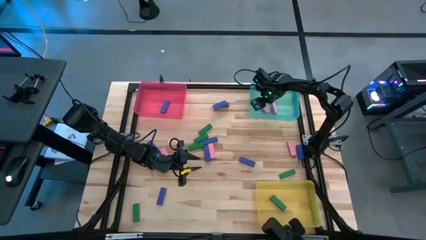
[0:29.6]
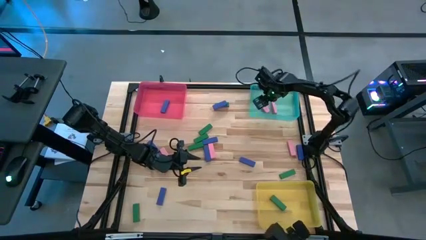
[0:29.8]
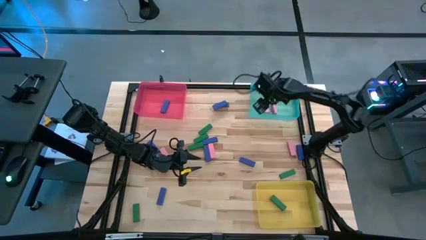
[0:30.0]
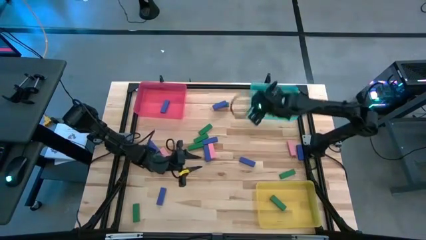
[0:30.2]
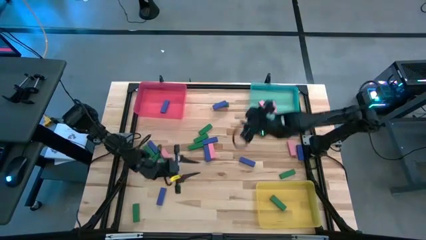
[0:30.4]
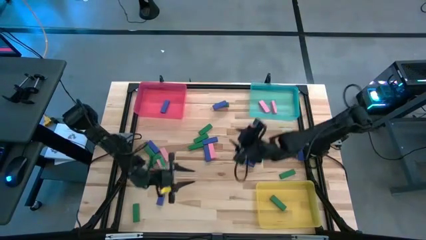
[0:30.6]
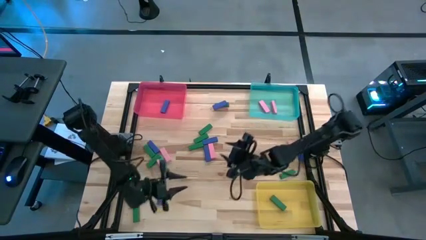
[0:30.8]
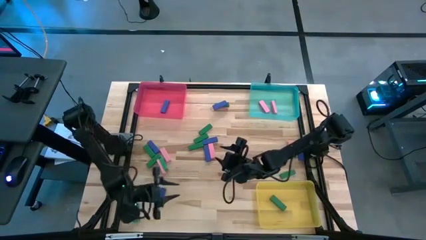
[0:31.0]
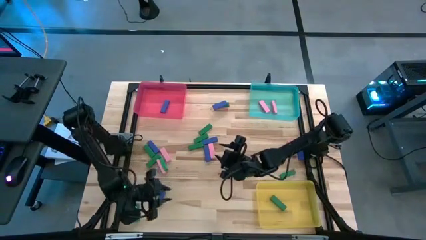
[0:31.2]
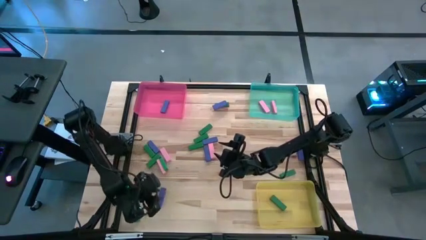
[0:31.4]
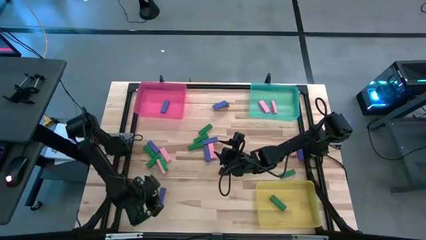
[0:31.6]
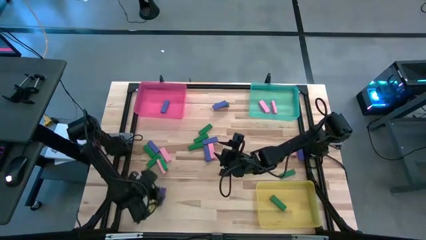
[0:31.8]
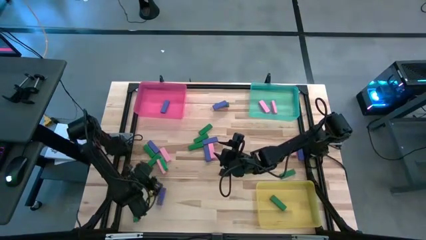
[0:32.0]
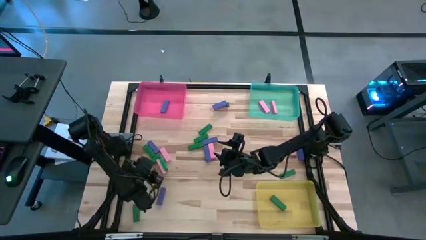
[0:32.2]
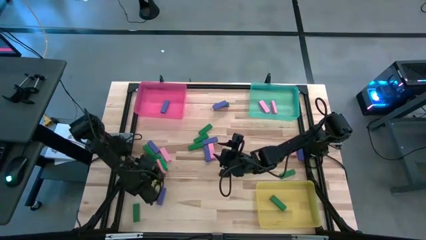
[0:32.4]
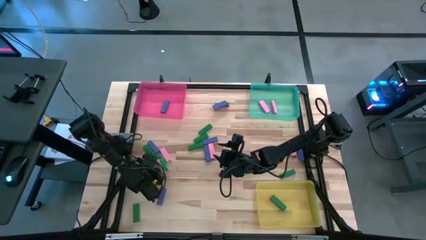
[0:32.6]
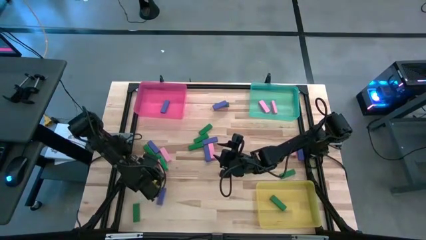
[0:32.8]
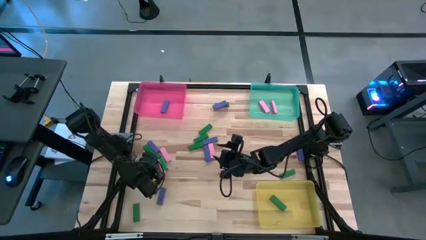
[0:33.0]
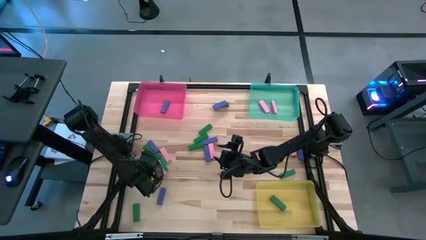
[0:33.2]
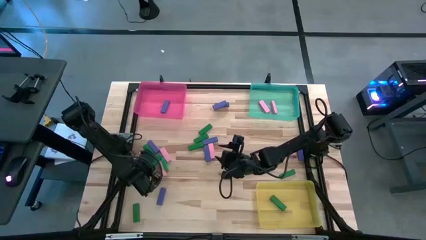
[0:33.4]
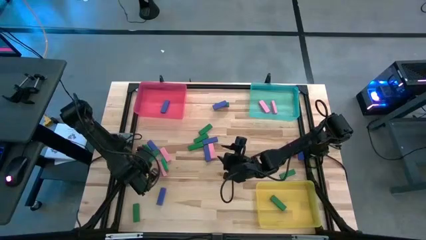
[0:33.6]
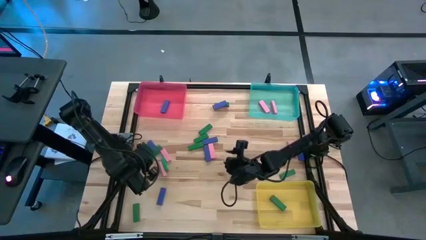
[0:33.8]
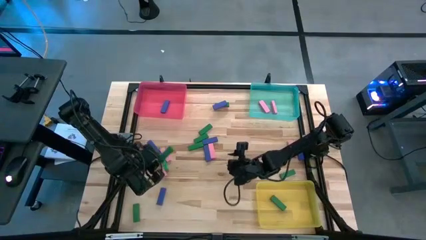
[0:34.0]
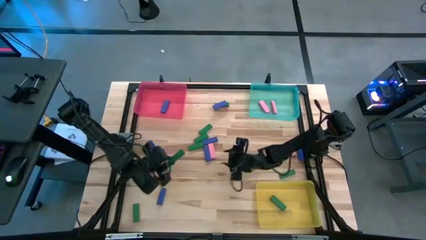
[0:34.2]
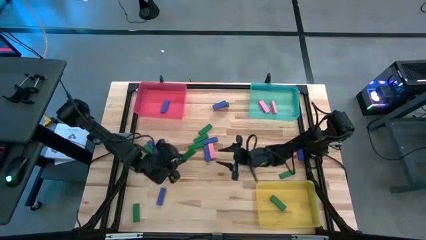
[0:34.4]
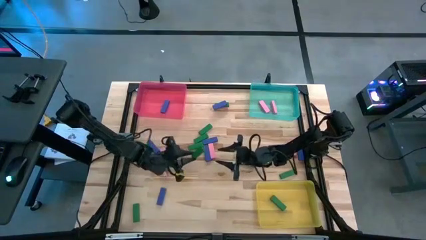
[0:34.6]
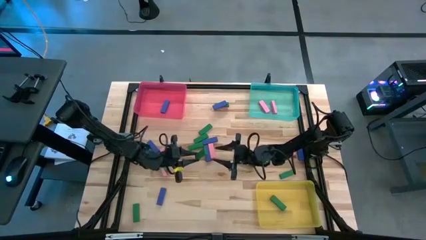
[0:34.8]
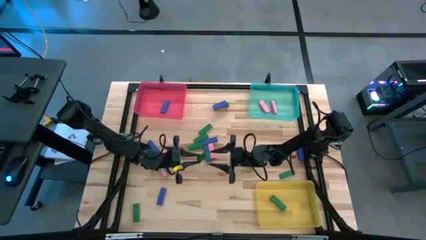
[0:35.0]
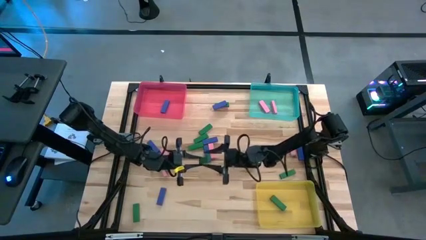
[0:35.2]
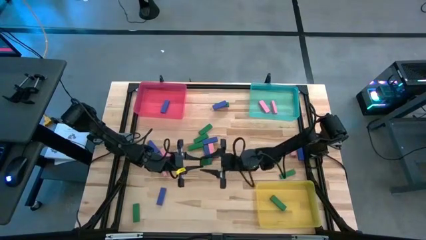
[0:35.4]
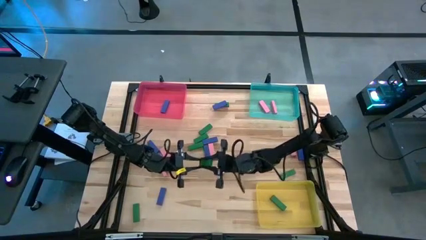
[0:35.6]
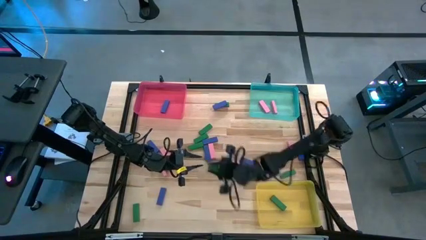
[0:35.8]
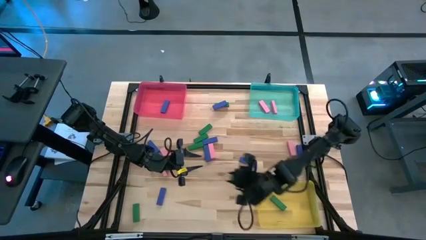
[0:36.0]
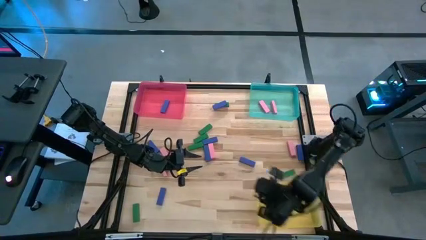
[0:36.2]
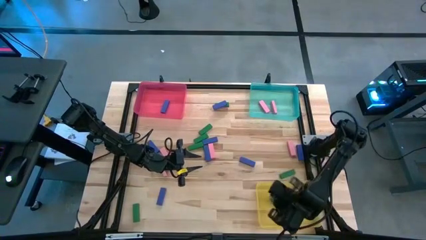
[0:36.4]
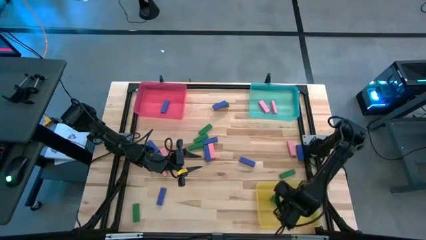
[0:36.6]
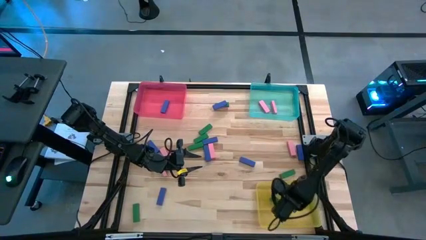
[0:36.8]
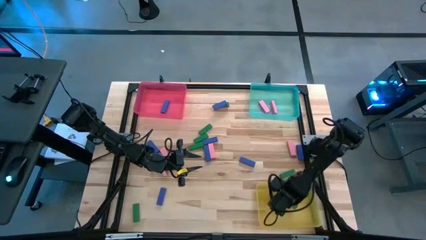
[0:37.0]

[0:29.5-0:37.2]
Task: Sort blocks
Put the green block into the yellow bin

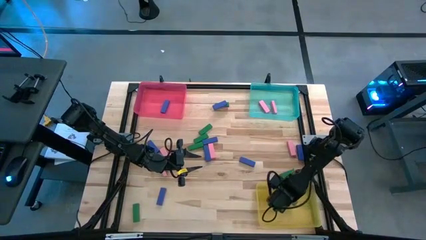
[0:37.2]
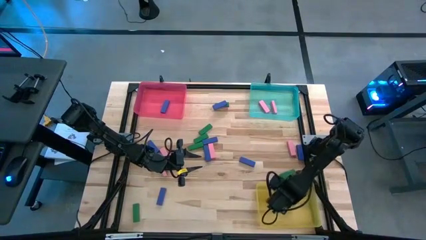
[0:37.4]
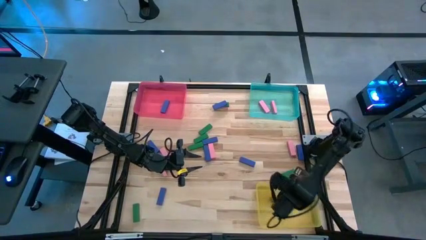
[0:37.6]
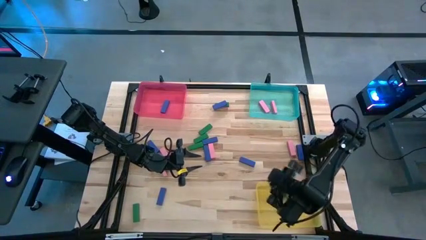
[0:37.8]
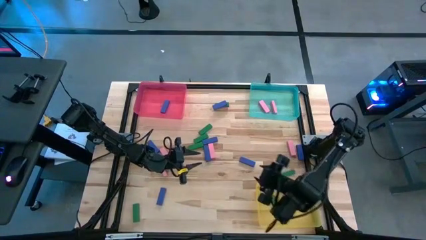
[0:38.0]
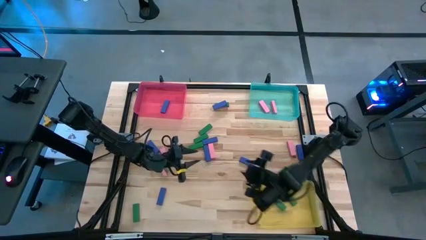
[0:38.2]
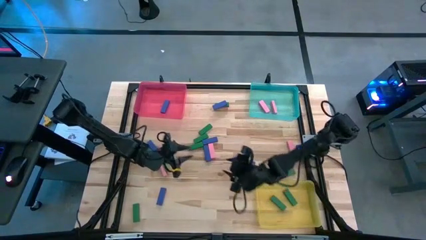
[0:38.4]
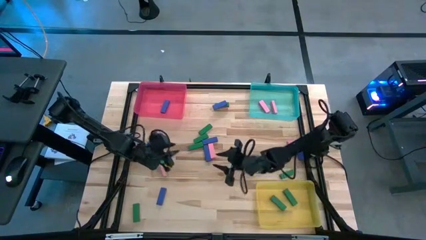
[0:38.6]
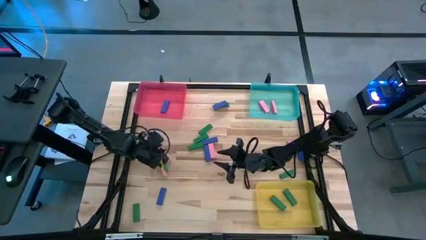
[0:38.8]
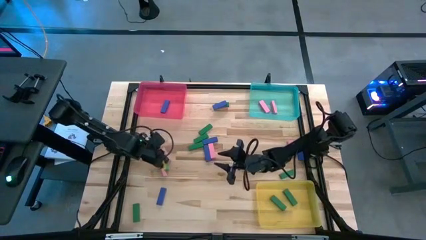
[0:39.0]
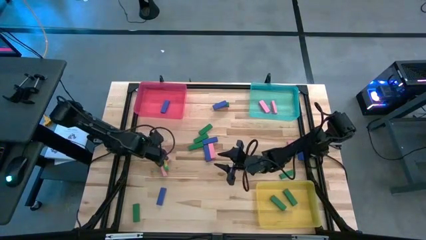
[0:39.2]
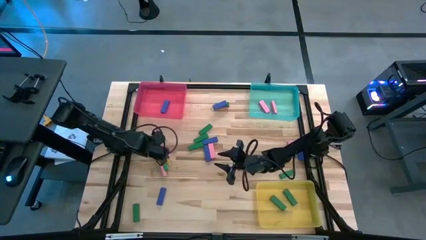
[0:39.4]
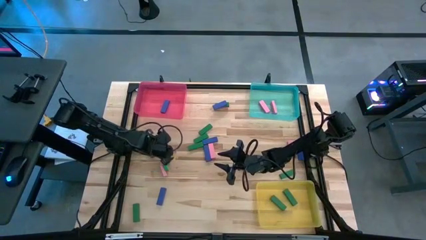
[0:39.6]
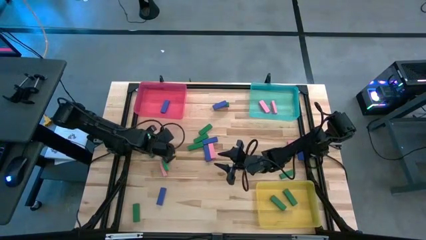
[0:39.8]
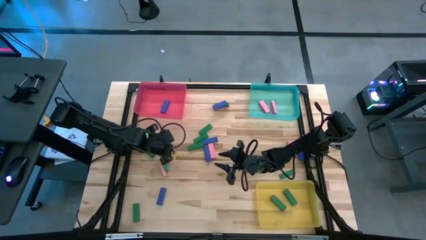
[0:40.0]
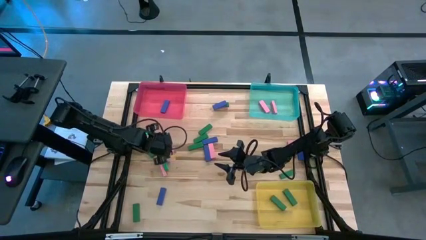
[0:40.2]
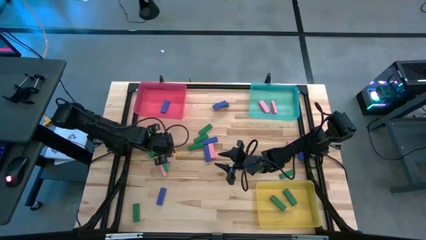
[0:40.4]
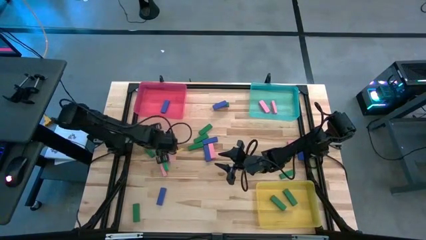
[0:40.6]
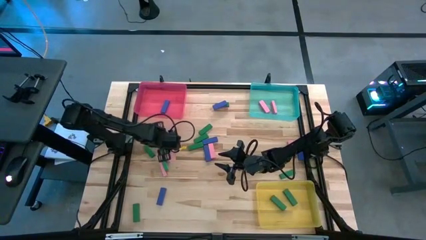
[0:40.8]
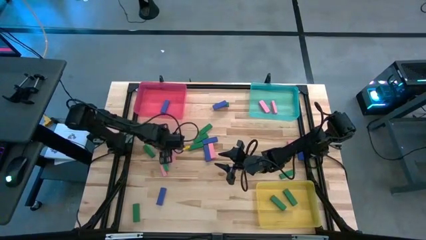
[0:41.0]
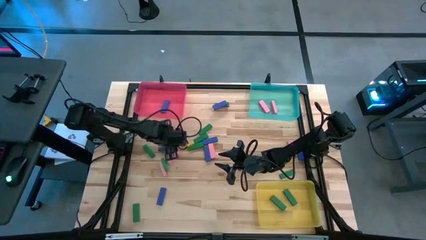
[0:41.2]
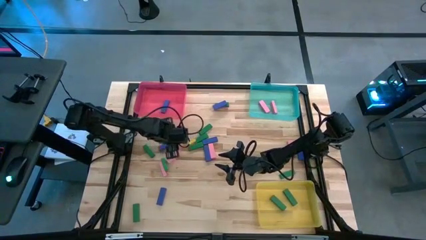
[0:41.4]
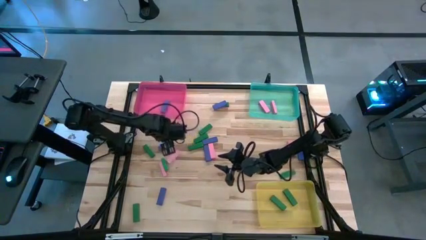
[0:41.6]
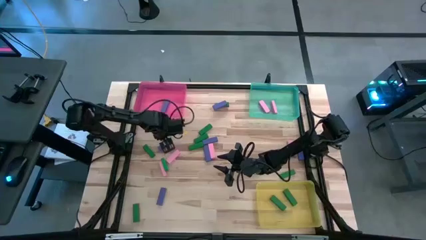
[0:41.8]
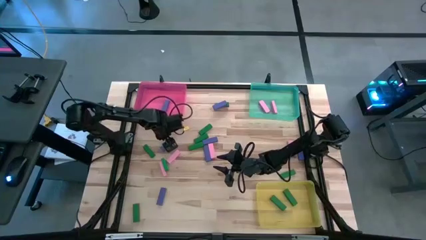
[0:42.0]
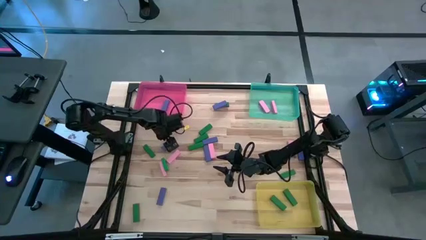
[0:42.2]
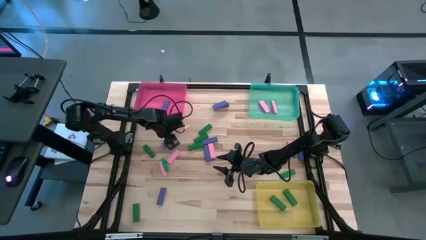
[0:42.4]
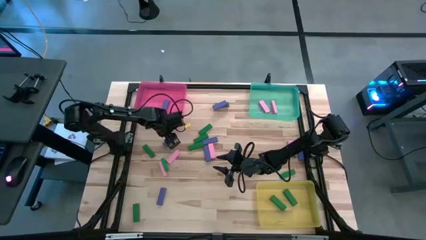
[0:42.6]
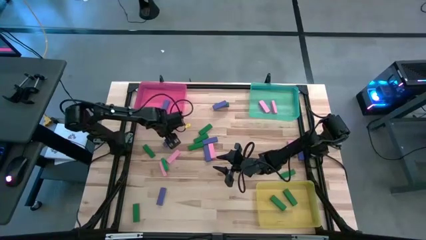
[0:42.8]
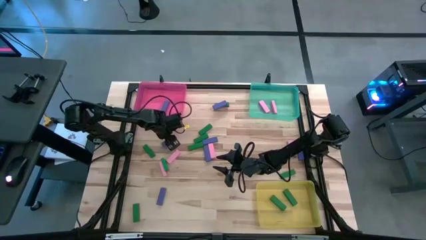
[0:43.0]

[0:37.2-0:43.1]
Put the blue block into the red bin

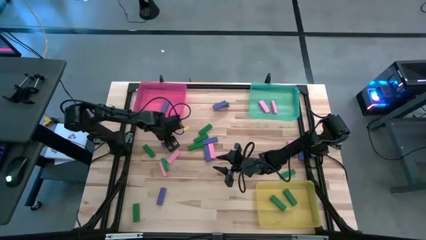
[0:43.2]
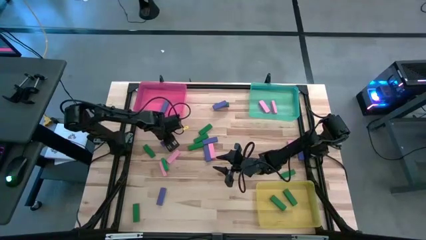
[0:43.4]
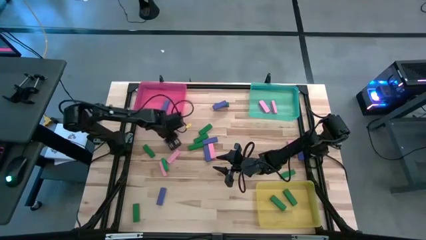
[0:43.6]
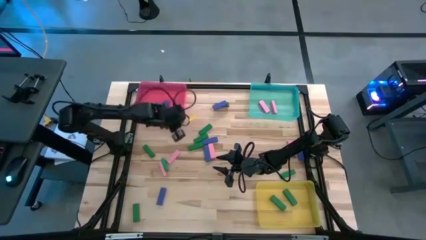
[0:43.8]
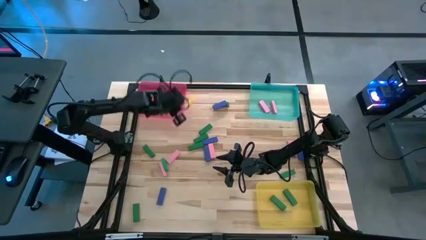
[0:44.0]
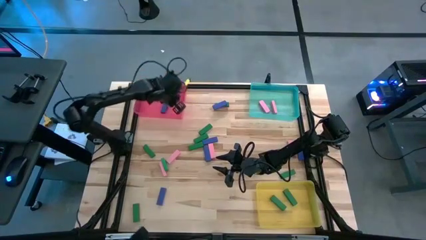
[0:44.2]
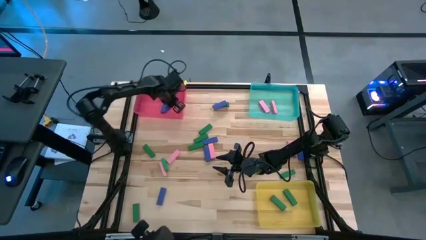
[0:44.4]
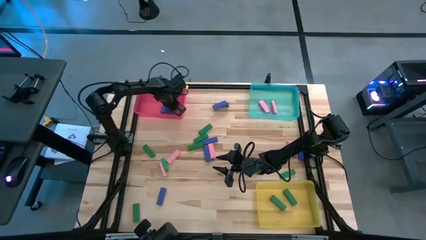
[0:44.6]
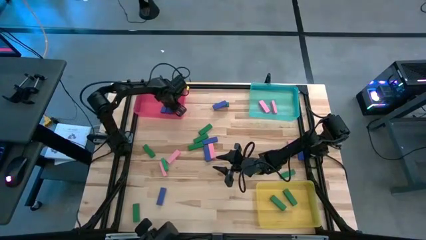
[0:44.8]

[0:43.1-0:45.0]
Put the blue block into the red bin

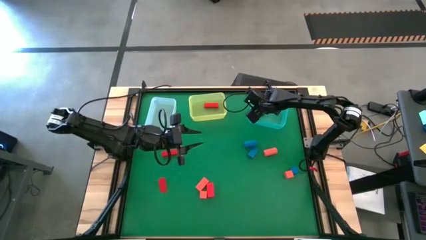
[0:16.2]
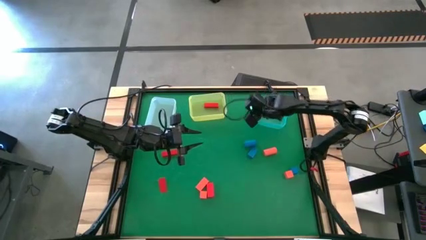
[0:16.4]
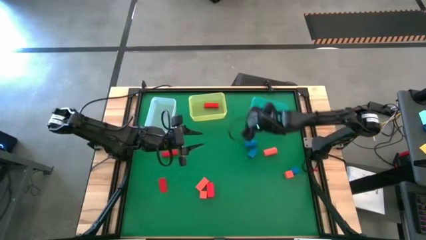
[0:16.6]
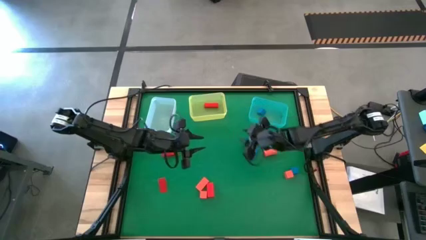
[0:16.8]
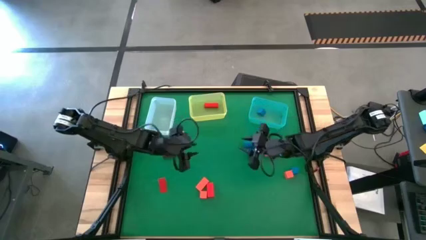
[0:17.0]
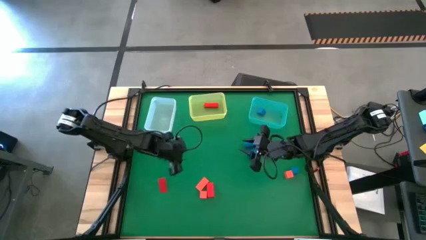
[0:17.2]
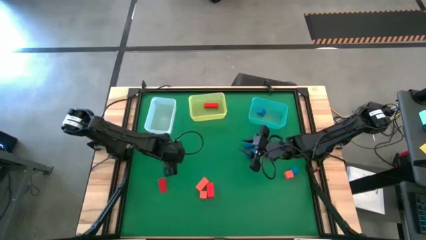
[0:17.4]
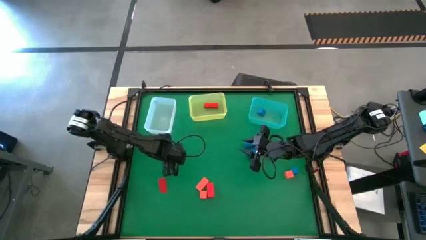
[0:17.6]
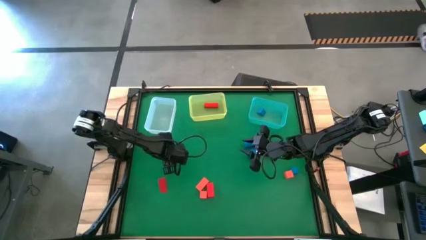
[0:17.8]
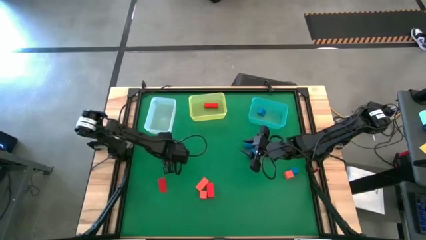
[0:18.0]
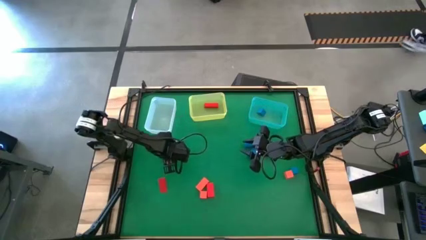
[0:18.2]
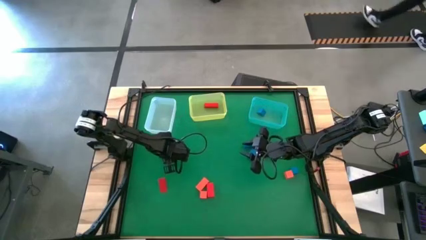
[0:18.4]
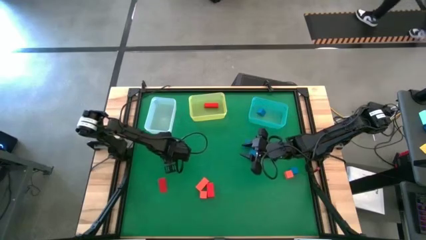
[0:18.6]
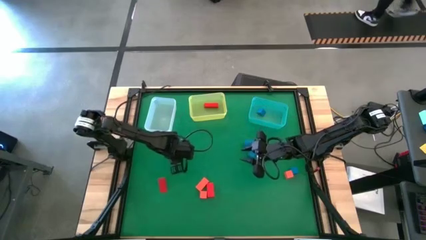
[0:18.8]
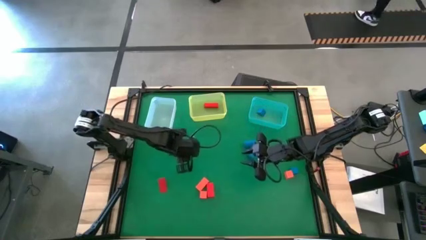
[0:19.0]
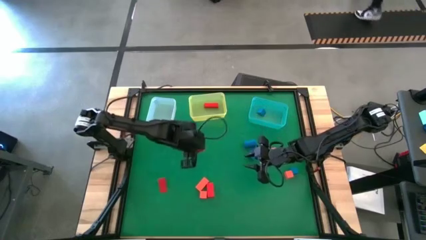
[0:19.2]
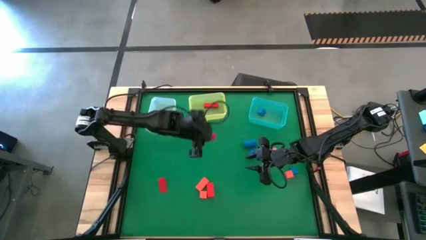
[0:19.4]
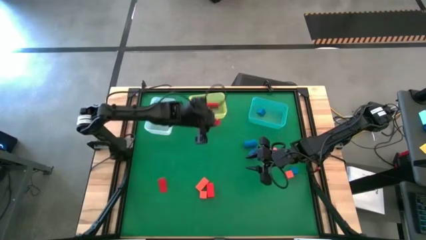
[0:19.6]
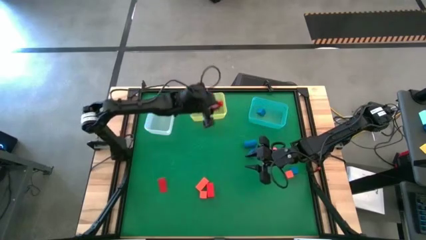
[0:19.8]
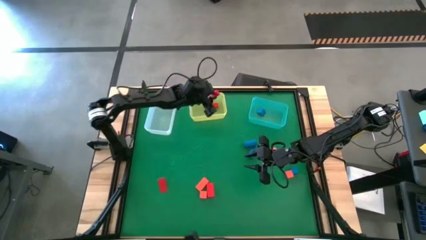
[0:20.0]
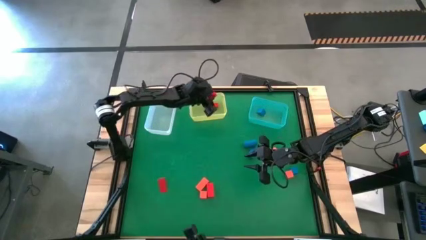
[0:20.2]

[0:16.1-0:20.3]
Task: Sort & place blocks by color
Put the red block into the yellow bin
